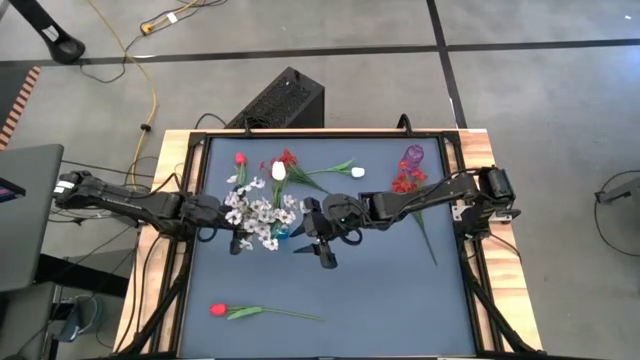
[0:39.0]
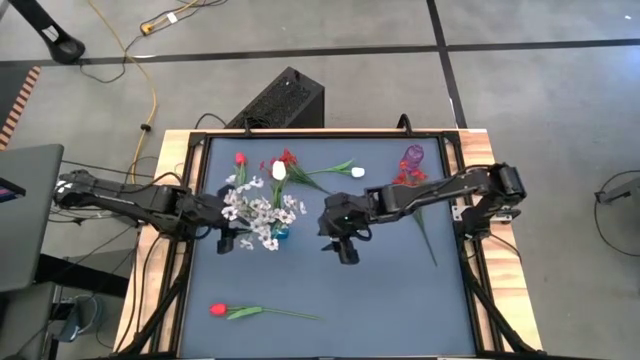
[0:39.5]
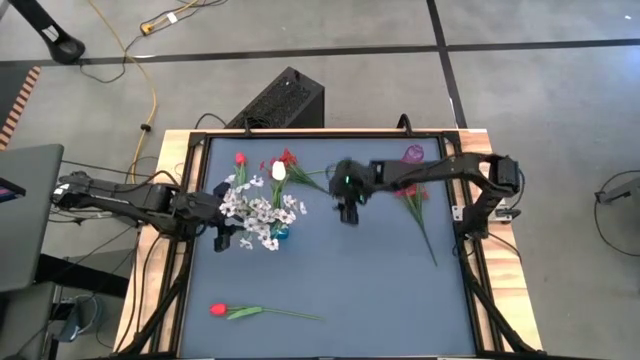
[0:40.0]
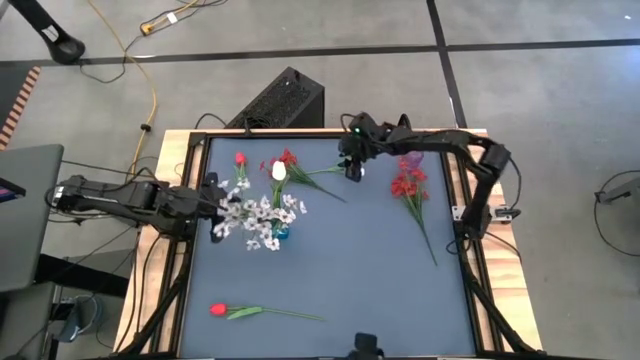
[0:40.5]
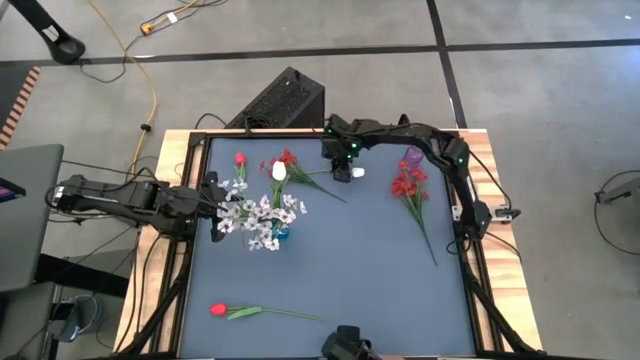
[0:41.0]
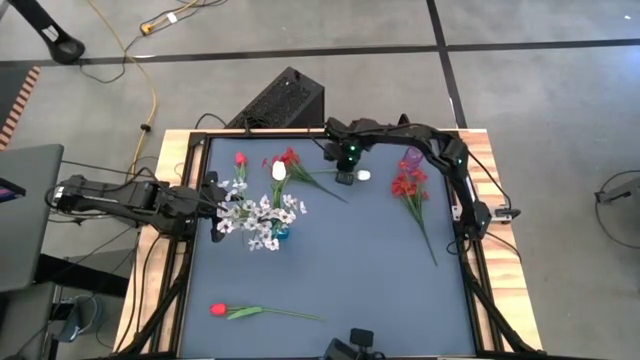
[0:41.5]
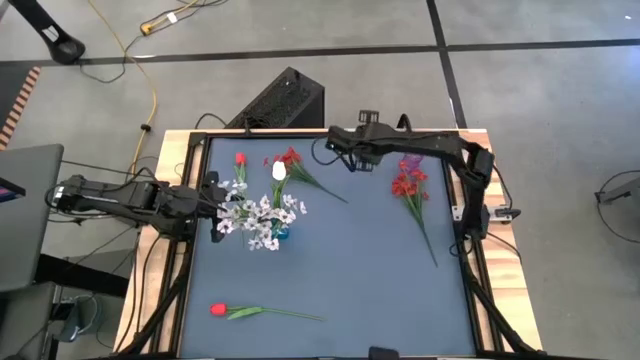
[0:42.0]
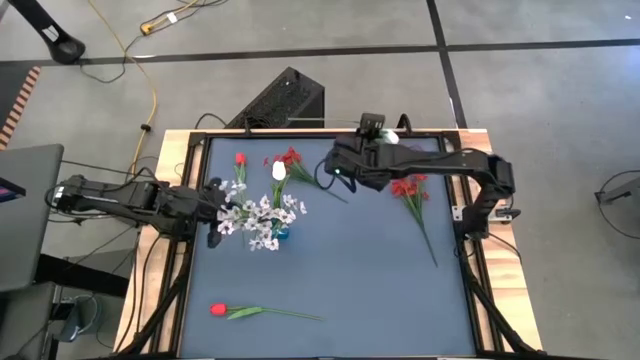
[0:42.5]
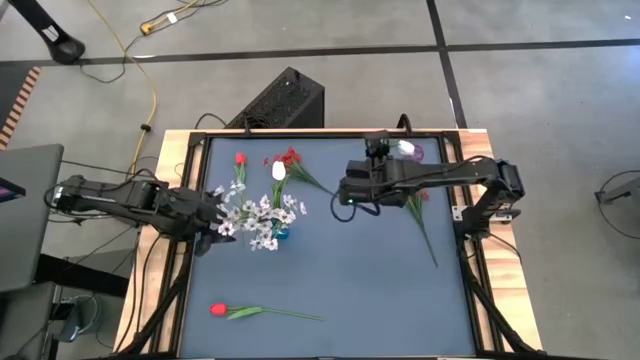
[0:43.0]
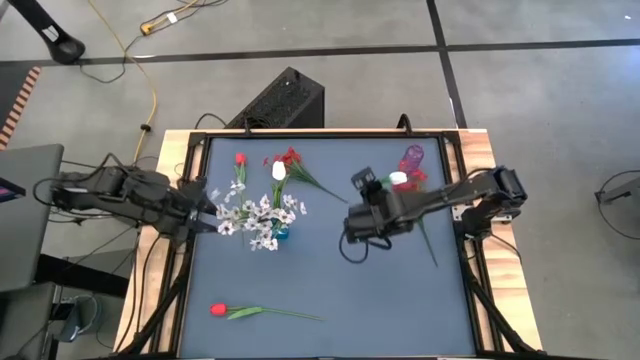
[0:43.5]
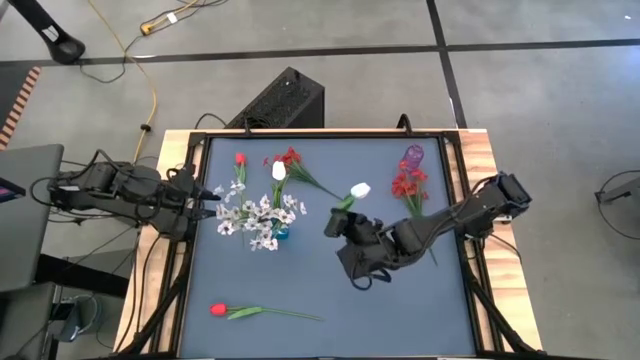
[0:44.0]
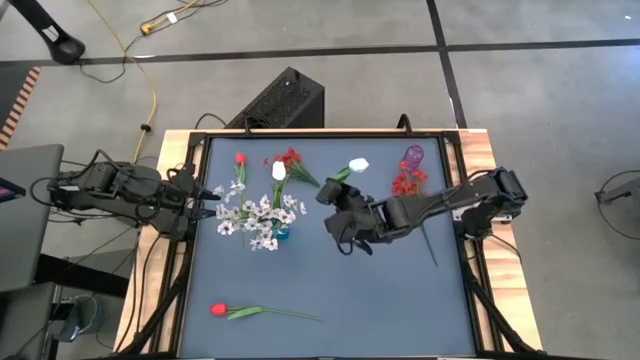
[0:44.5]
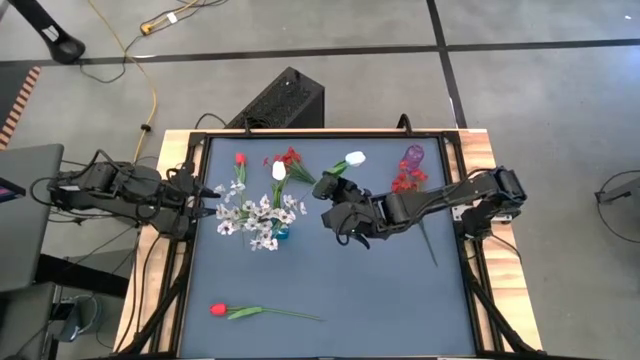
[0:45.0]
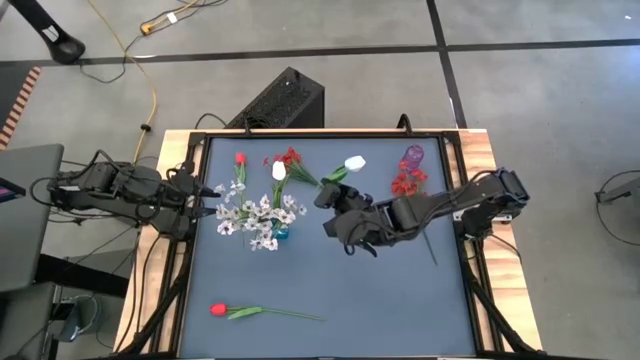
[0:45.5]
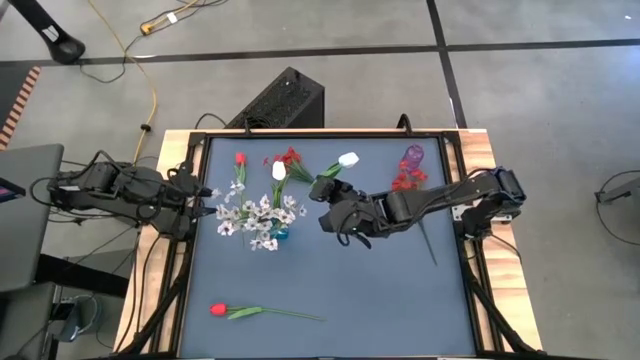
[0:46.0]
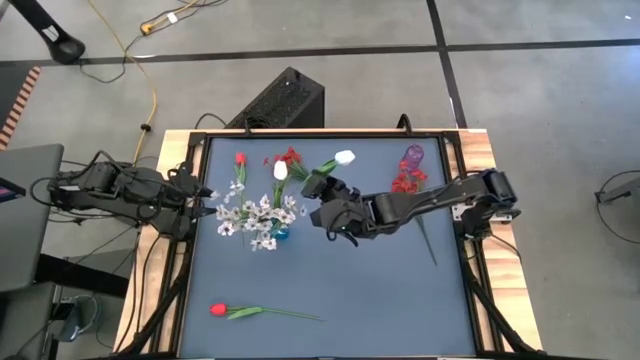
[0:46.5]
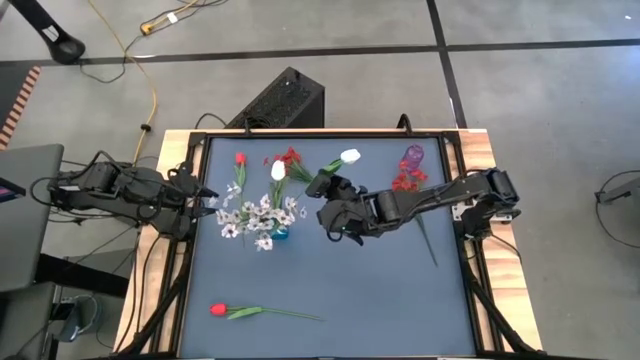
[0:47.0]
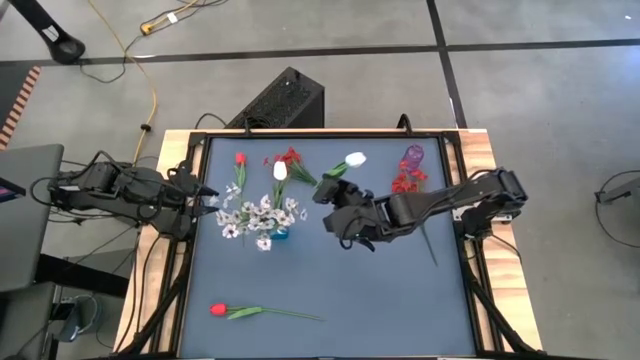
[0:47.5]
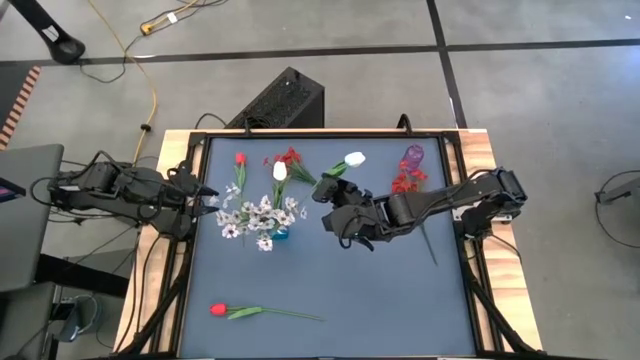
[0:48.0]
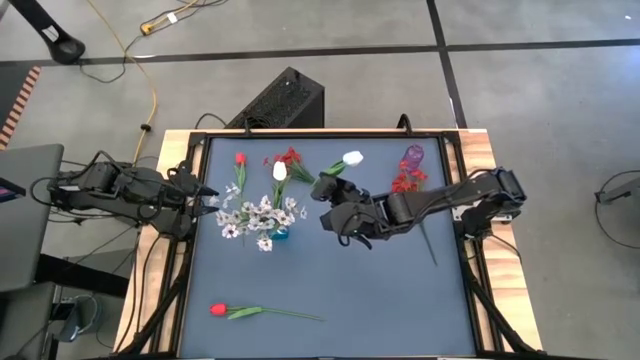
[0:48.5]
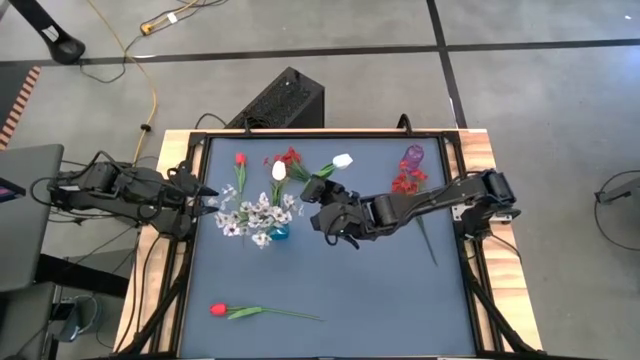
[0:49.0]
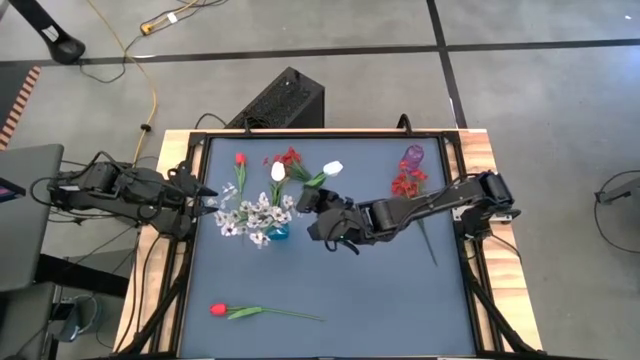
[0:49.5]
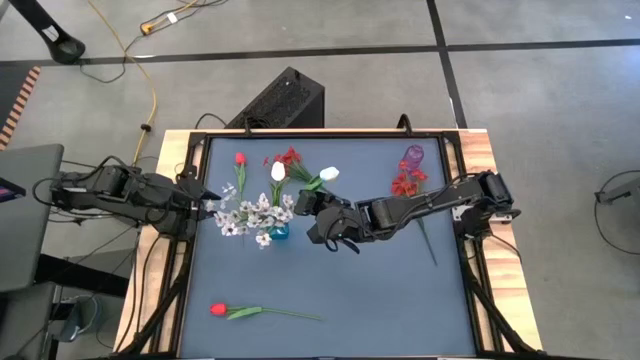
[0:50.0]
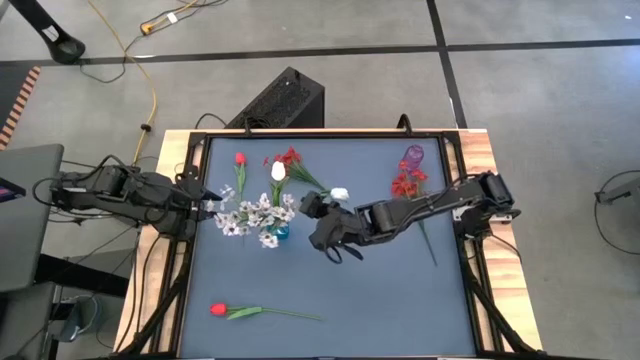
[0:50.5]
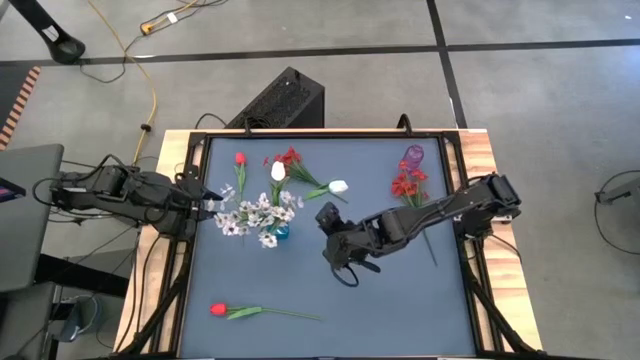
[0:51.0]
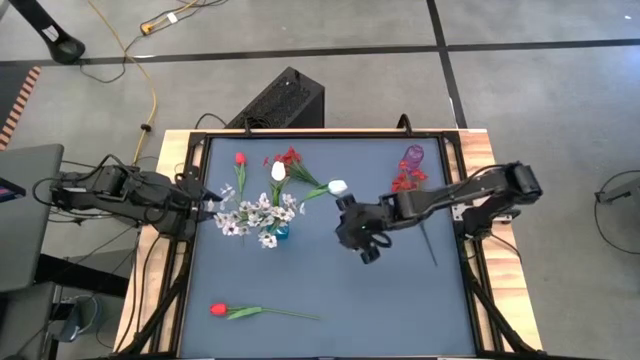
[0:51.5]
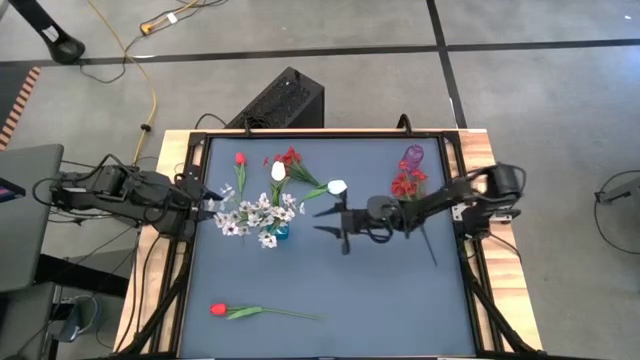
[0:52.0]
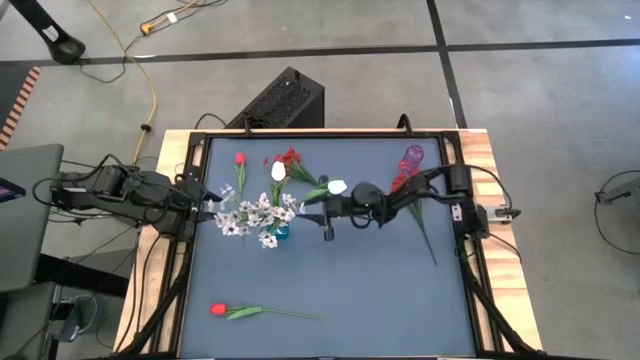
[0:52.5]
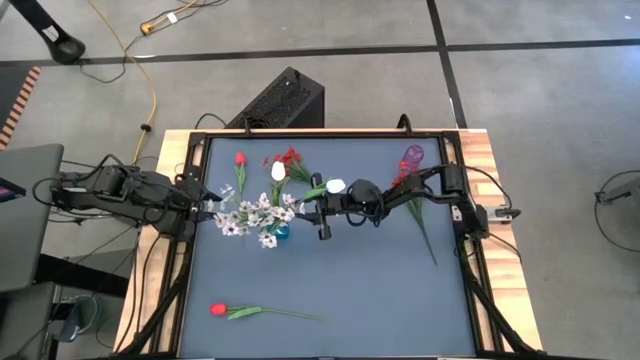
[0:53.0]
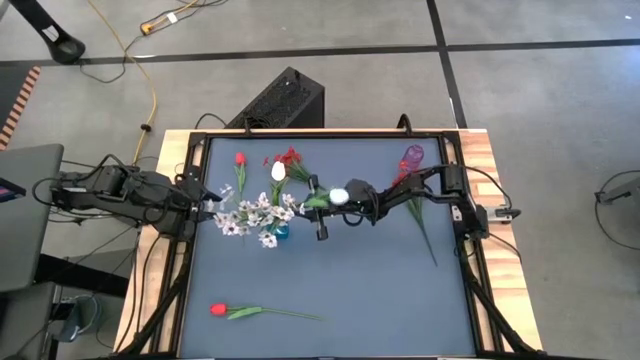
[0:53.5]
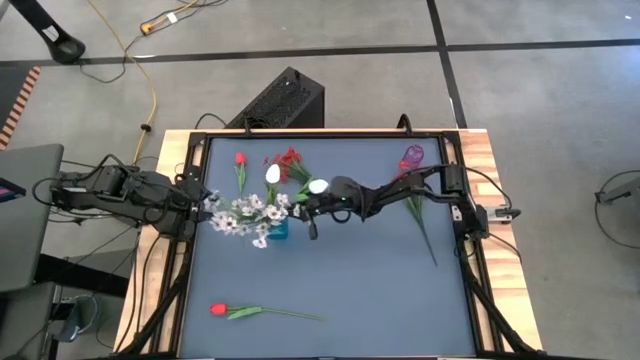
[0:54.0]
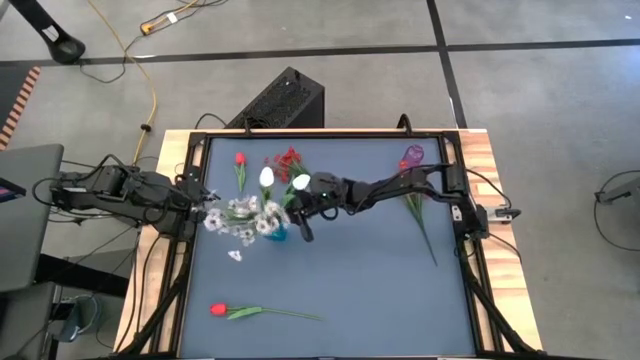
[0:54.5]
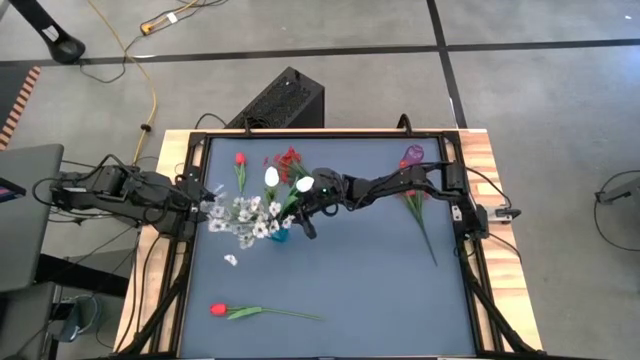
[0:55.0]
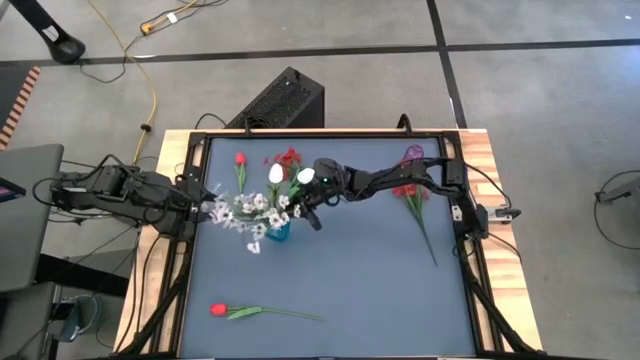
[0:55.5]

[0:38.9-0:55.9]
Task: Sort flowers into vase by color
Put the white flower into the blue vase

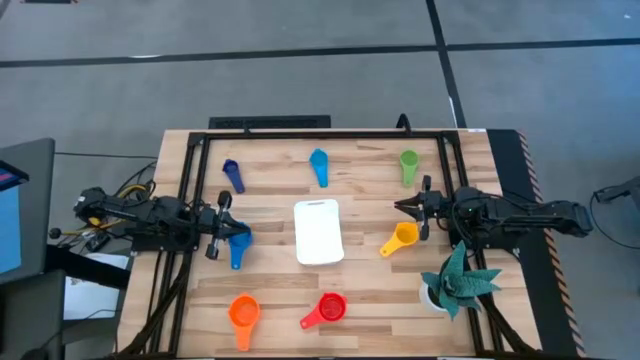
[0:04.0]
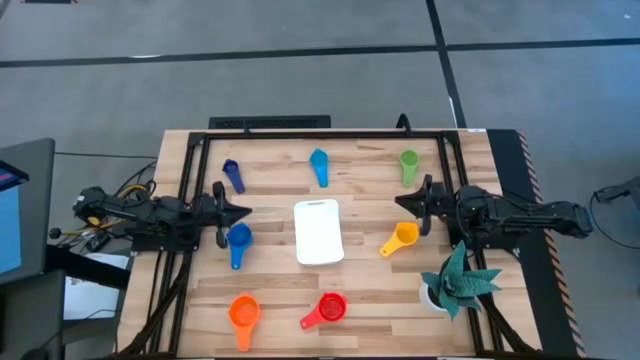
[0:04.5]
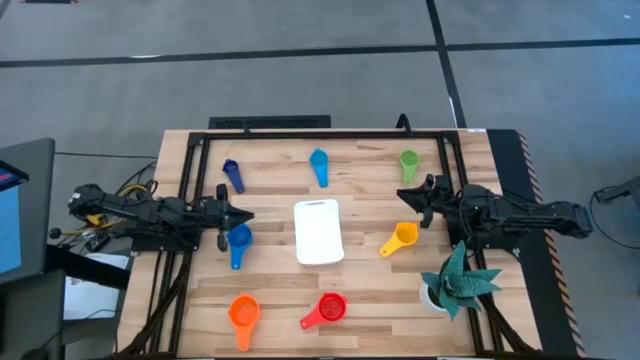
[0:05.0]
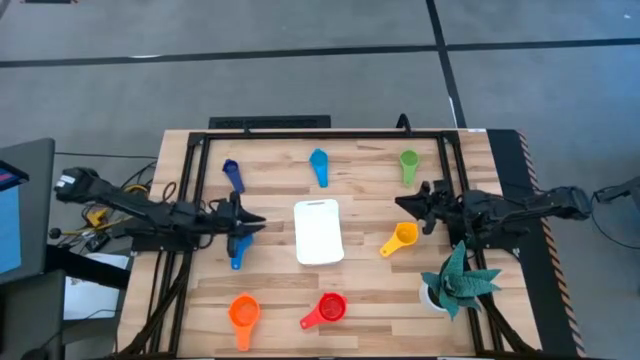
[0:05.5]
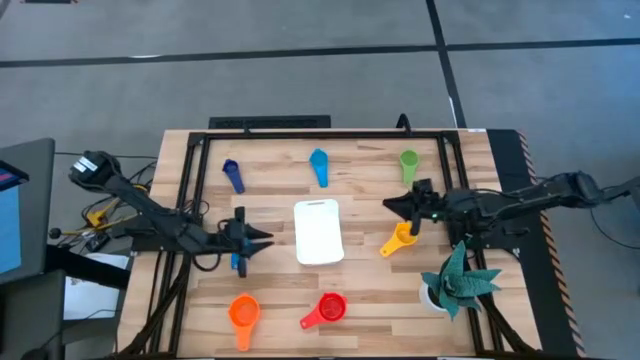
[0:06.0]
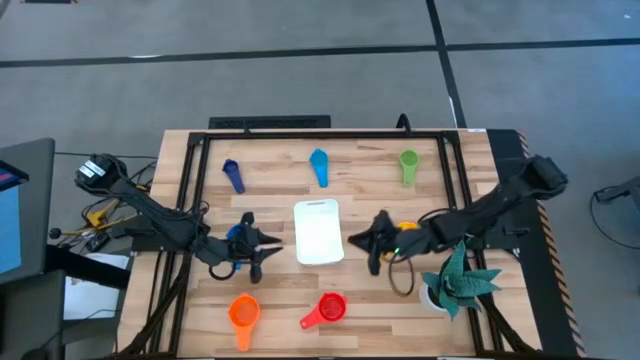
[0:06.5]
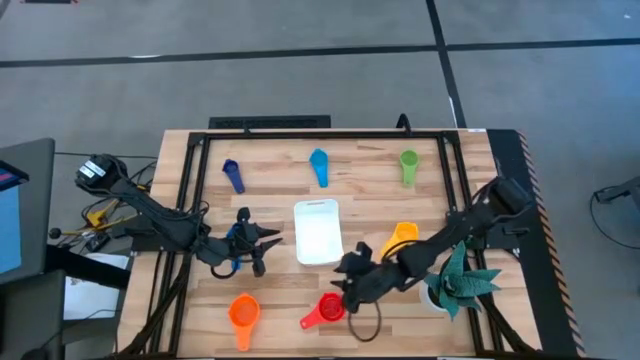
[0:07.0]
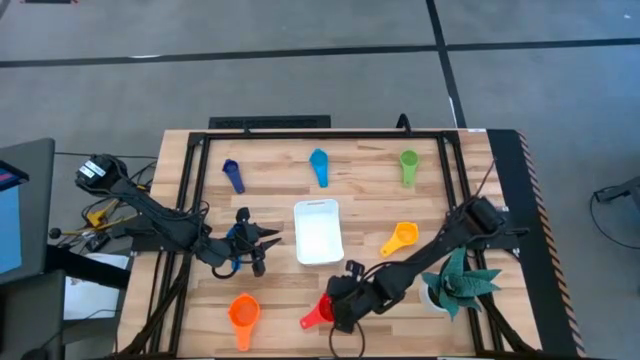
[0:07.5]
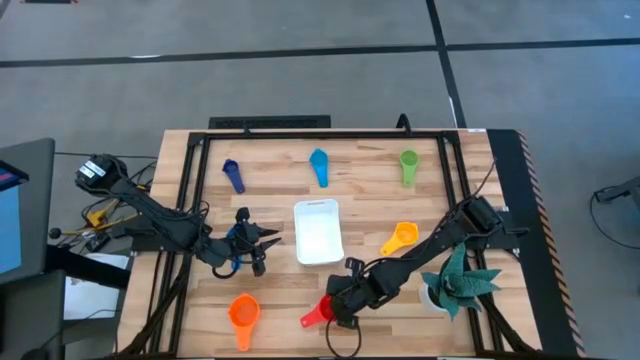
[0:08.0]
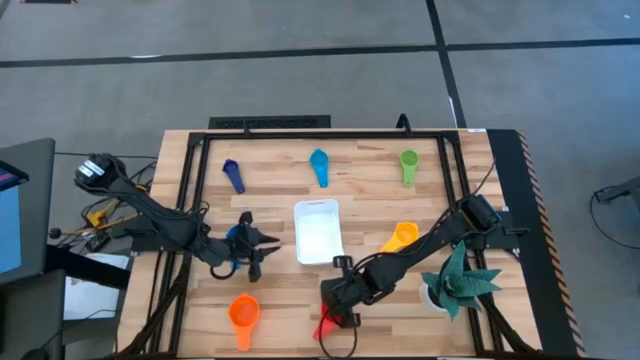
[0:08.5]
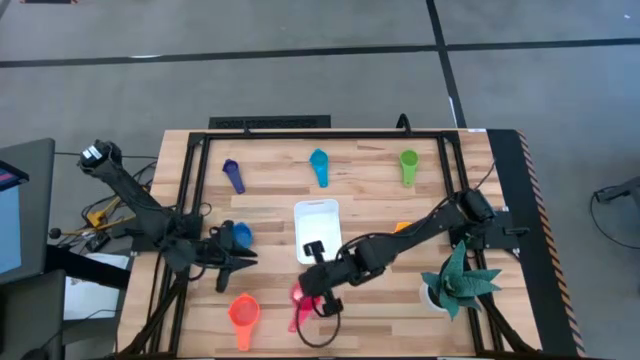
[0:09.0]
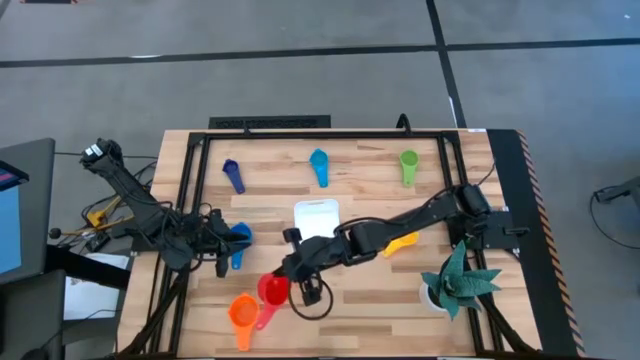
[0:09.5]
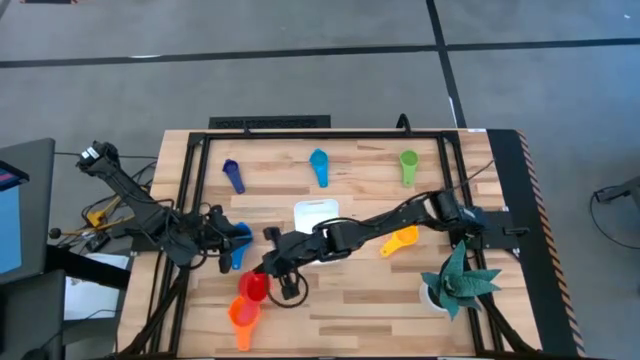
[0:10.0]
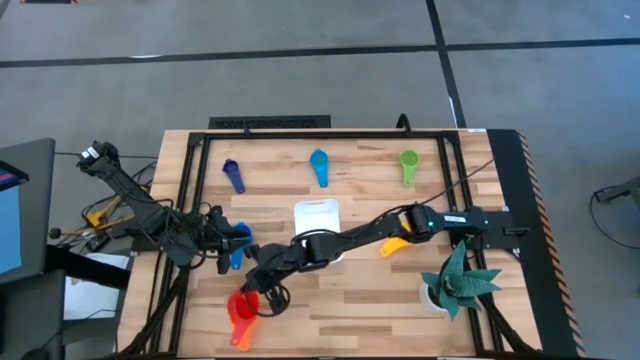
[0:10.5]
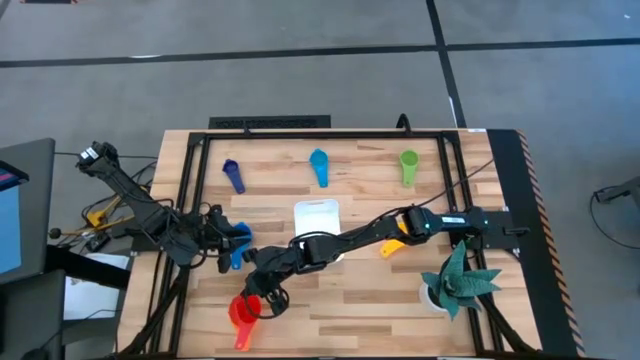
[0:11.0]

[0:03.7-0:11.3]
Task: Nest measuring cups in basket
Stack the red nest measuring cup into the orange nest measuring cup
